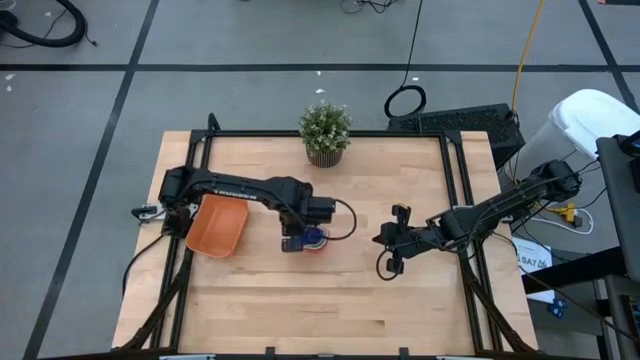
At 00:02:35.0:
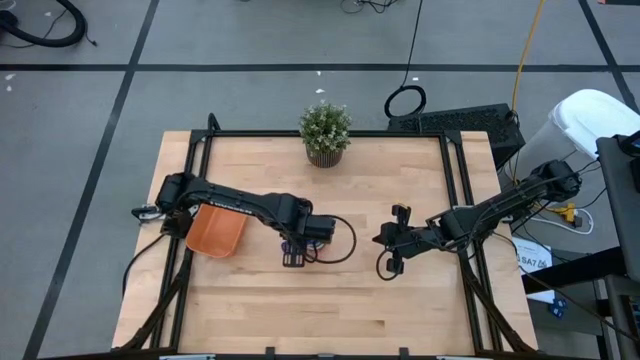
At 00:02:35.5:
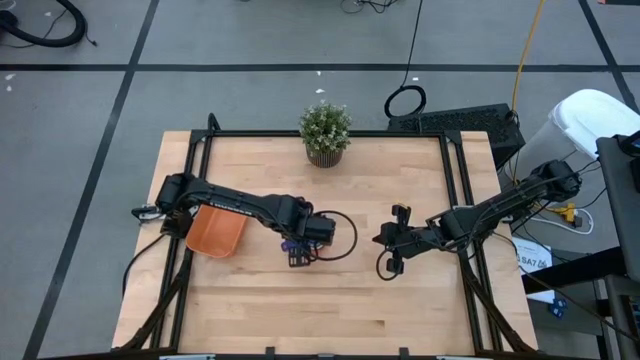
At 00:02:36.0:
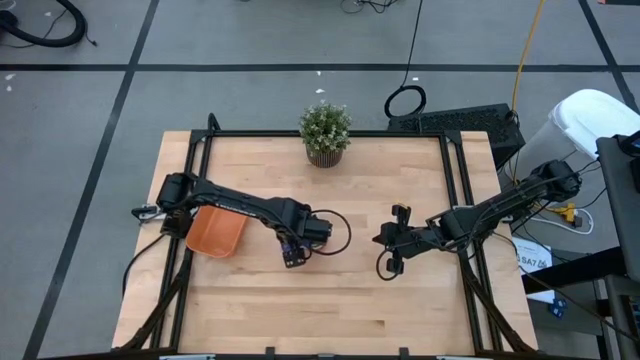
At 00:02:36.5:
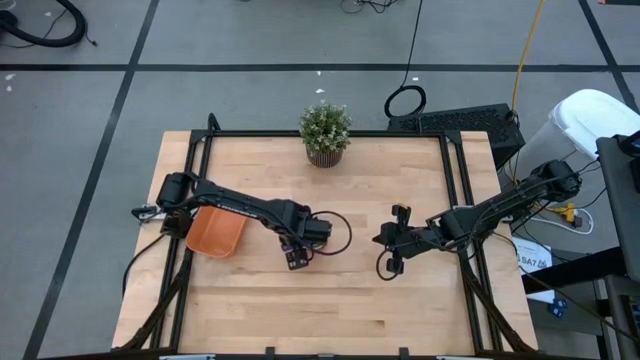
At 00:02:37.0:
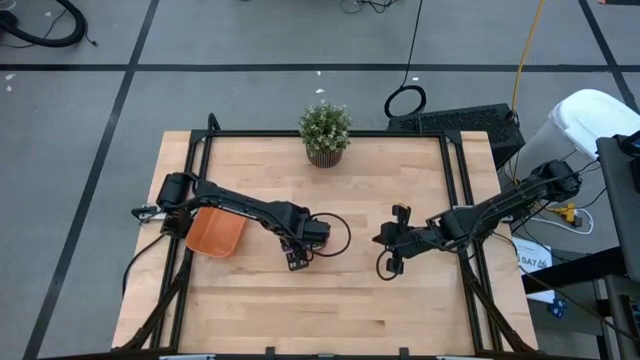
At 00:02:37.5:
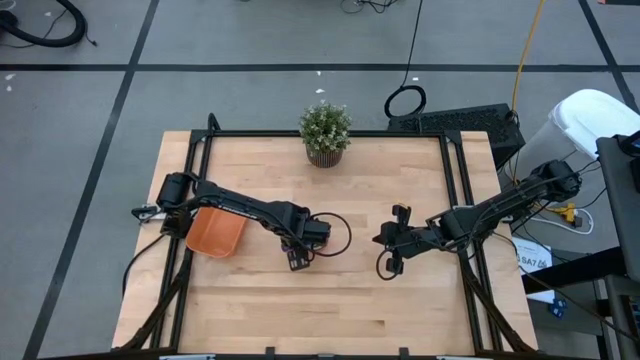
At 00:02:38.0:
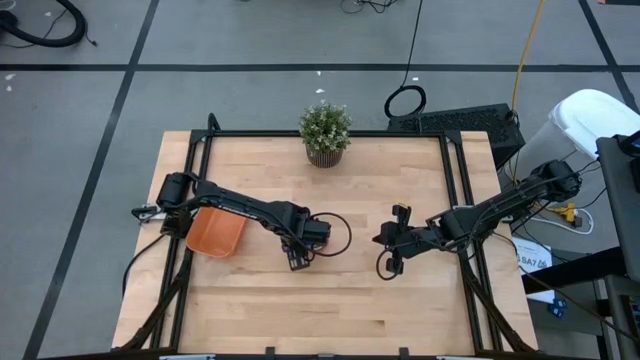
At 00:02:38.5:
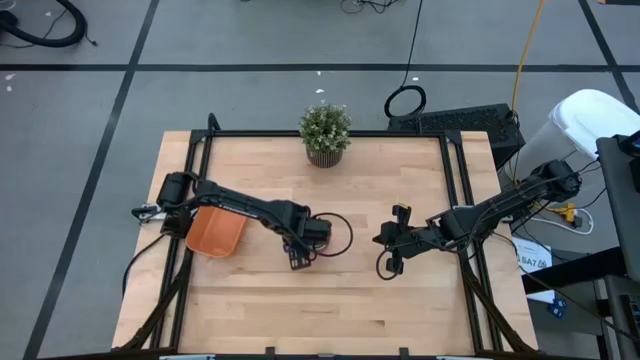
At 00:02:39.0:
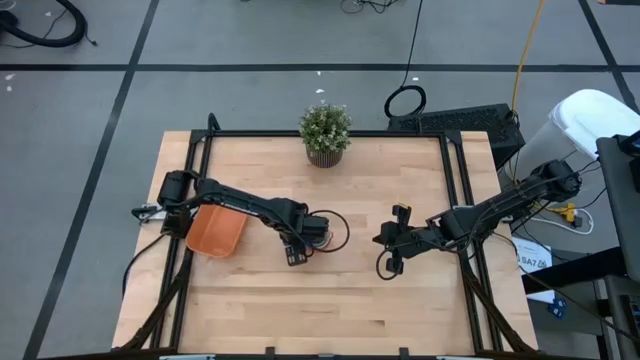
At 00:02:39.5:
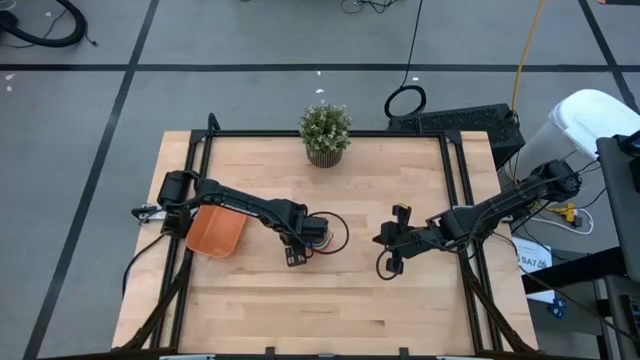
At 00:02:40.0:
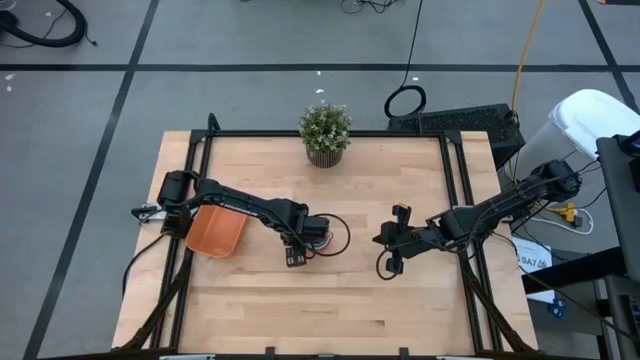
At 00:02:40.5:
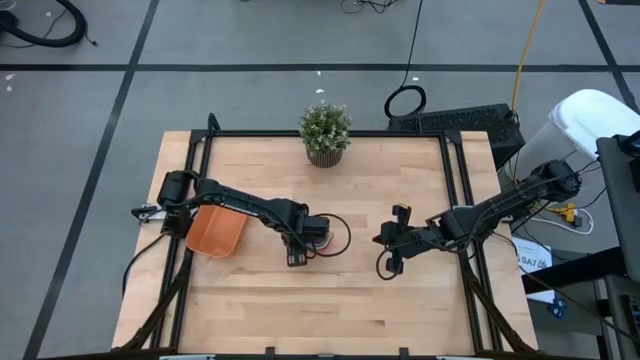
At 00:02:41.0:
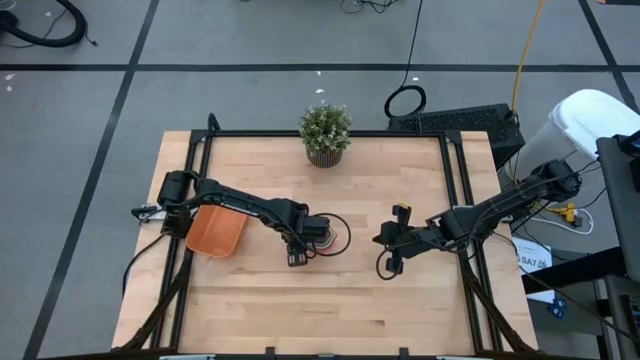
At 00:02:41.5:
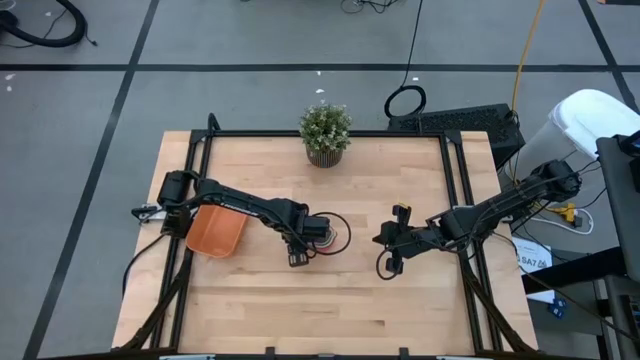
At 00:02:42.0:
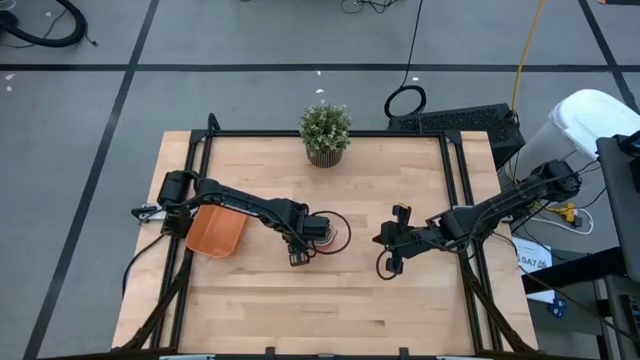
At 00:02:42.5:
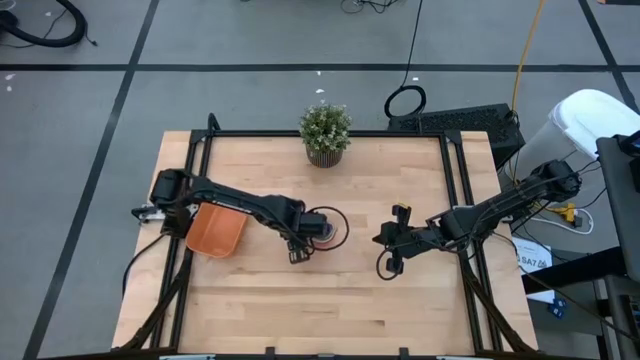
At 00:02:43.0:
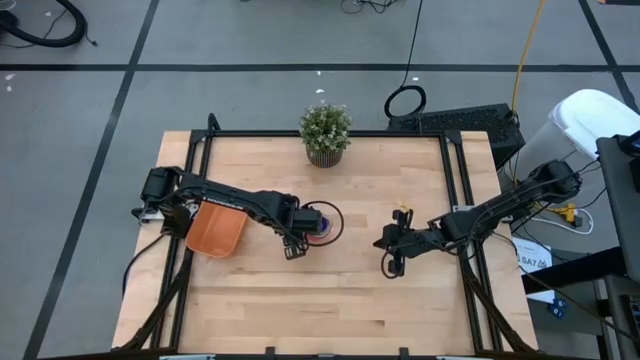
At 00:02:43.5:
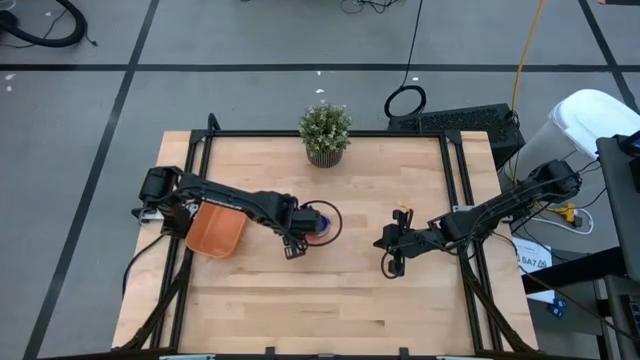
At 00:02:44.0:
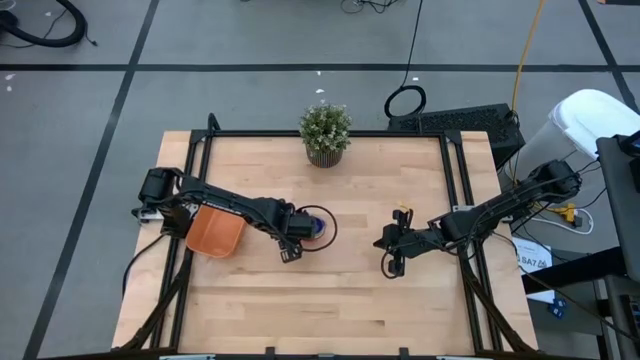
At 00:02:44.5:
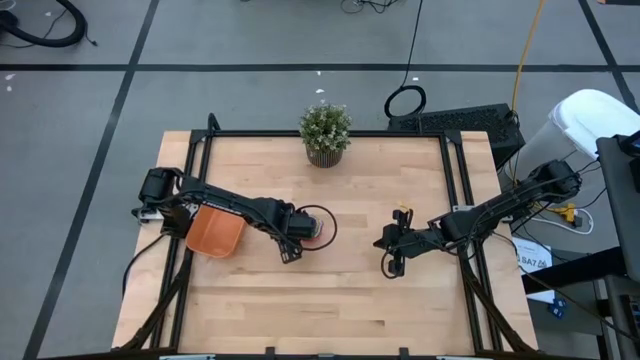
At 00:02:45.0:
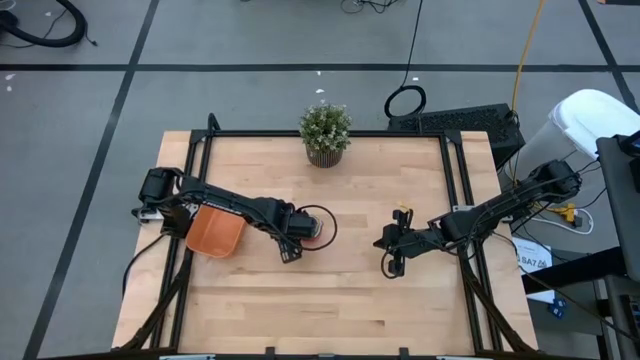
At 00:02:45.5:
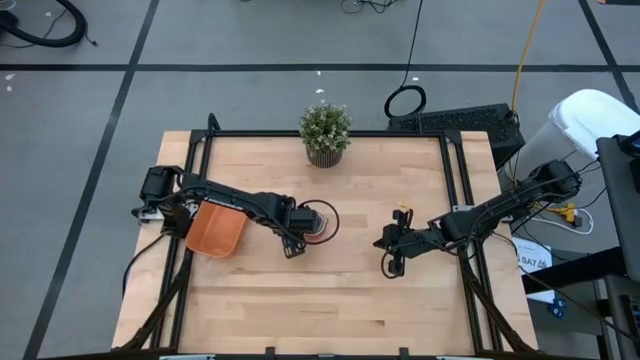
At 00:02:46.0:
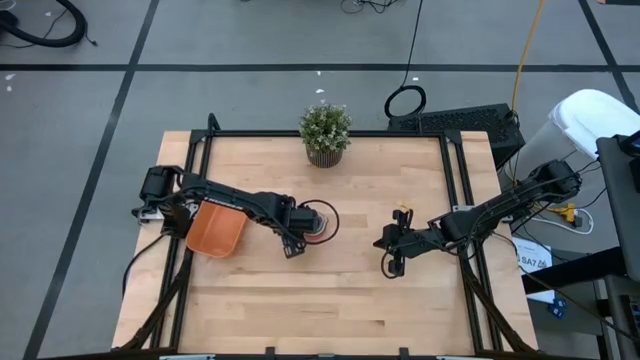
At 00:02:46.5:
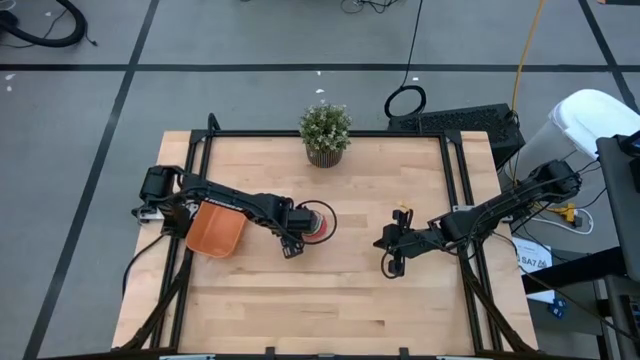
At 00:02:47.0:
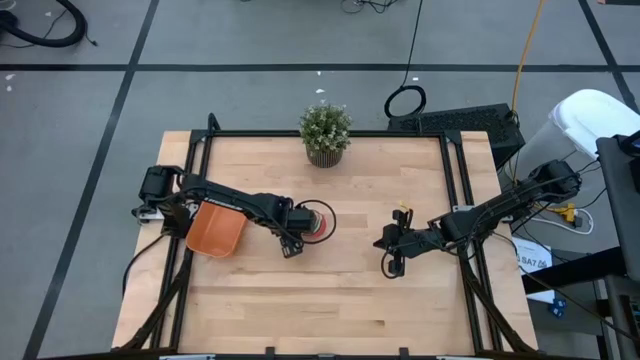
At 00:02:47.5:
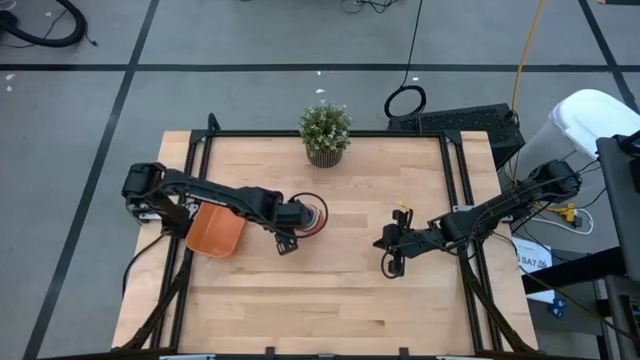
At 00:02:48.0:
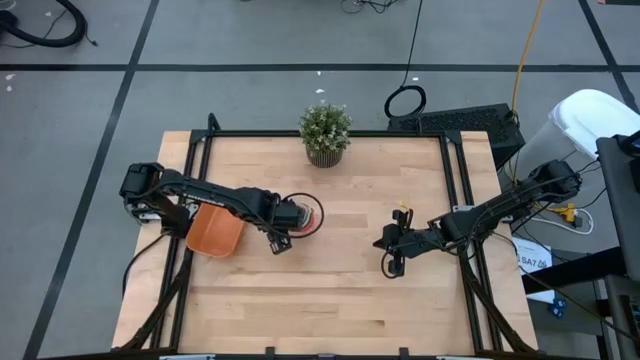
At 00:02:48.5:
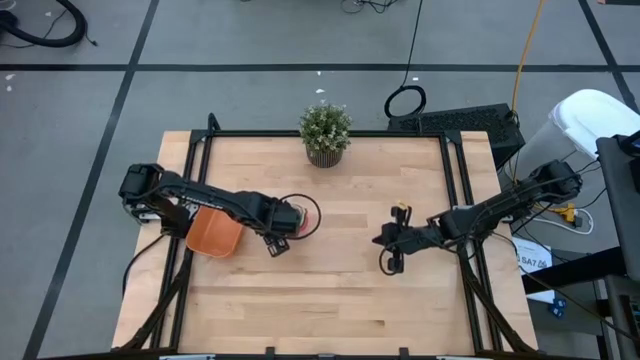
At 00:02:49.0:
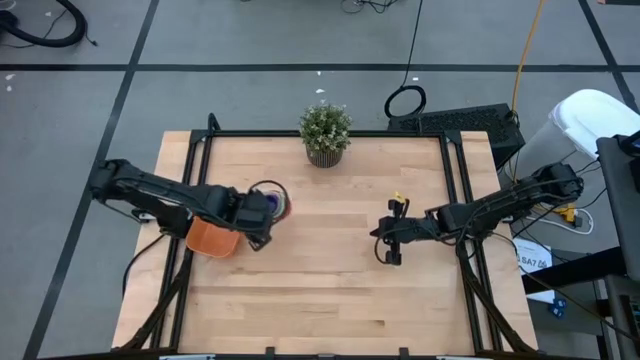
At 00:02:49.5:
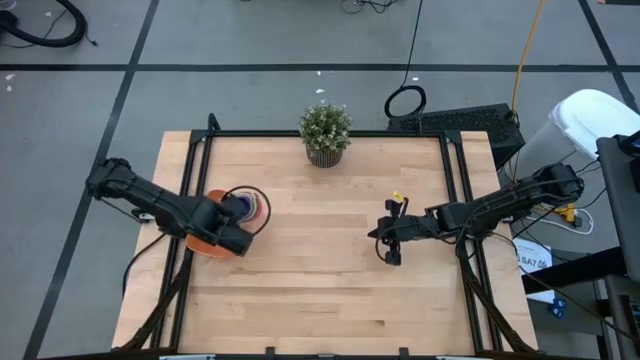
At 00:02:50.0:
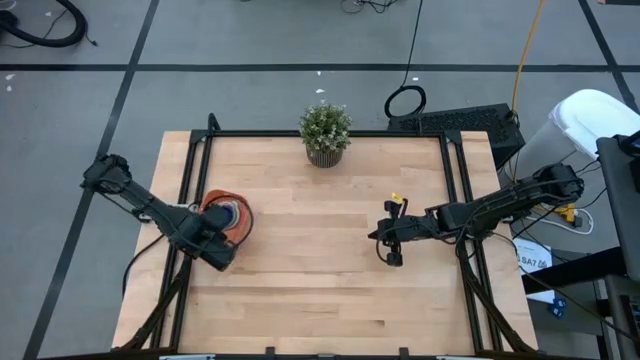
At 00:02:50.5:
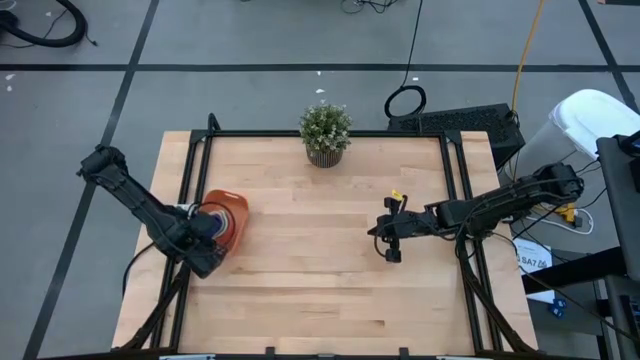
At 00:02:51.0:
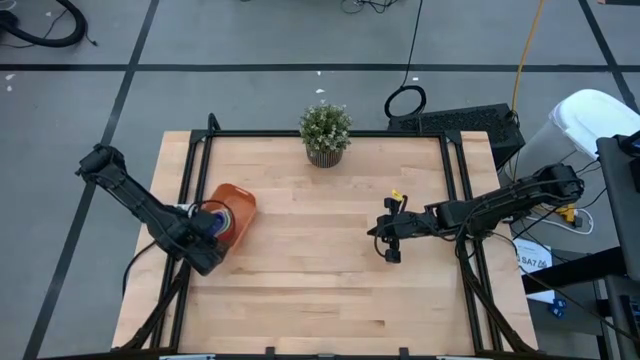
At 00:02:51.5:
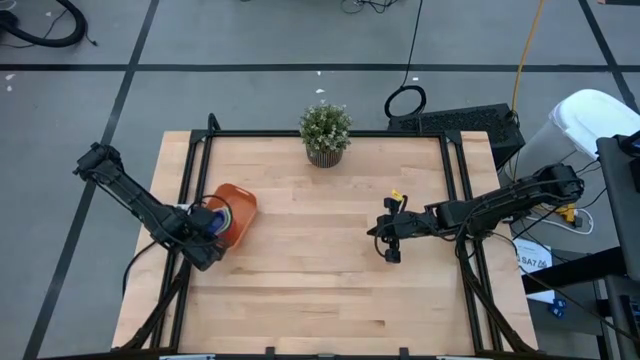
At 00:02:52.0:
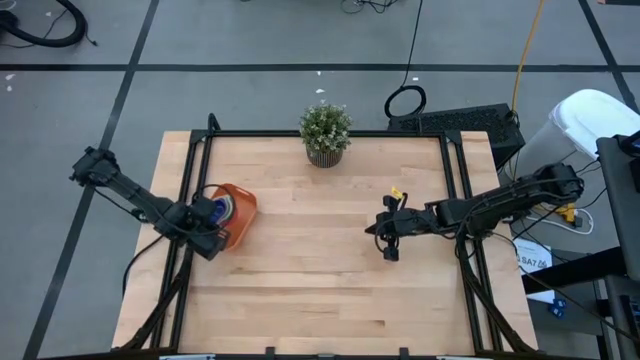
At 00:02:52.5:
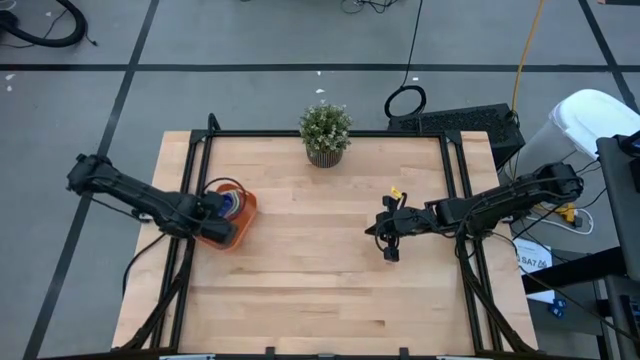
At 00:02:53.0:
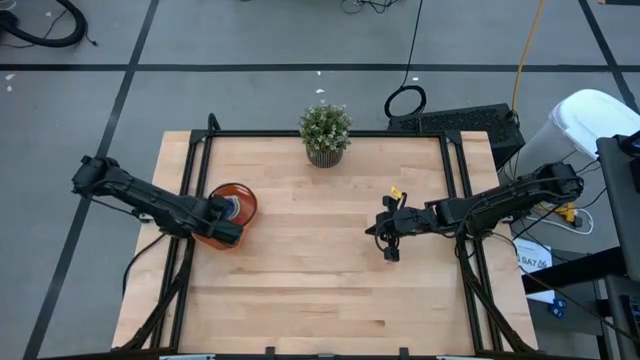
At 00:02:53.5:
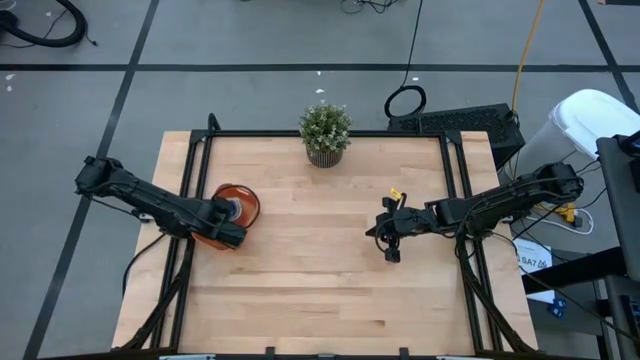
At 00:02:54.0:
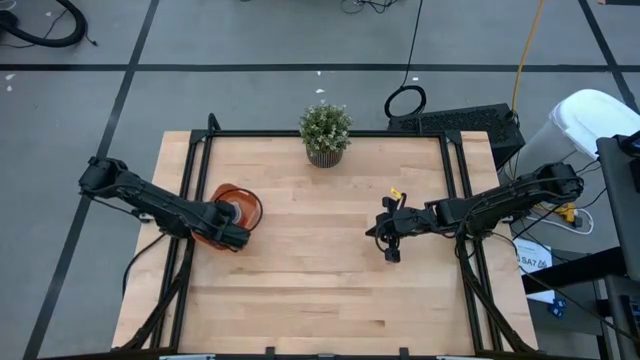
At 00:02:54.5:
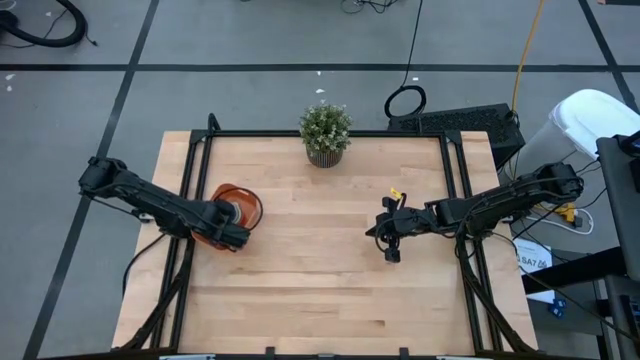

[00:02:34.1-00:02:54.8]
Task: Nest measuring cups in basket
Put the stacked measuring cups into the orange bin
